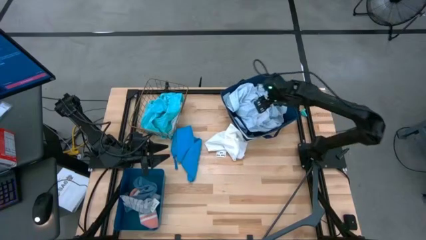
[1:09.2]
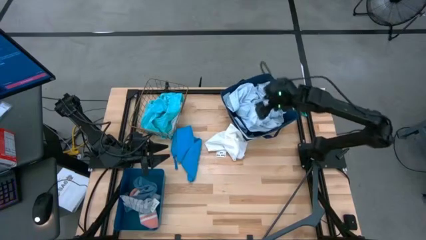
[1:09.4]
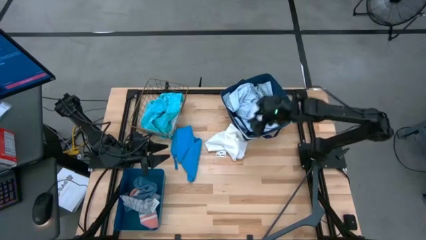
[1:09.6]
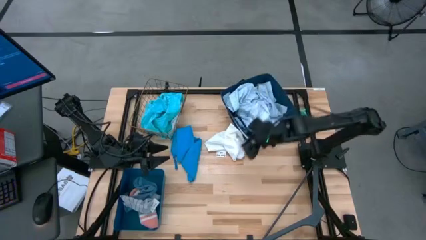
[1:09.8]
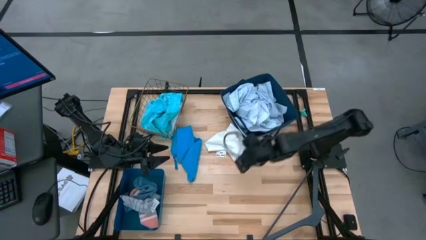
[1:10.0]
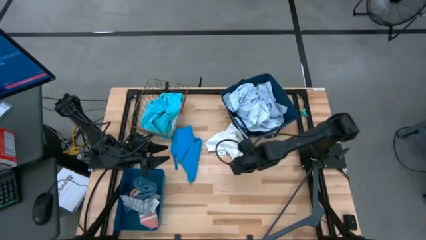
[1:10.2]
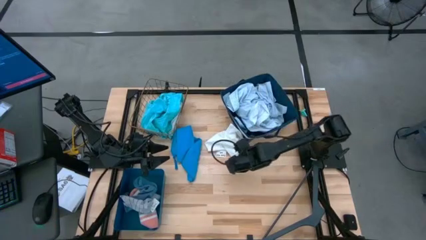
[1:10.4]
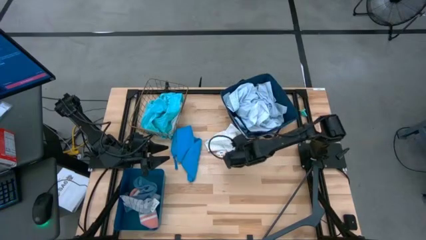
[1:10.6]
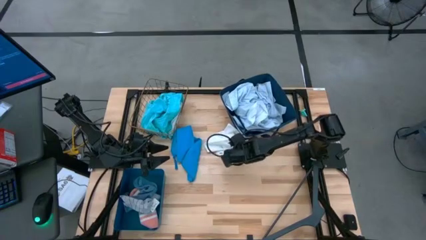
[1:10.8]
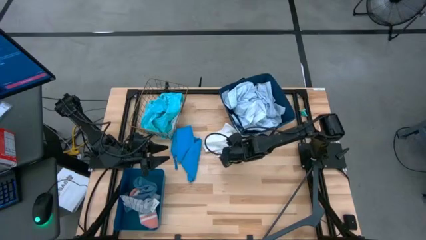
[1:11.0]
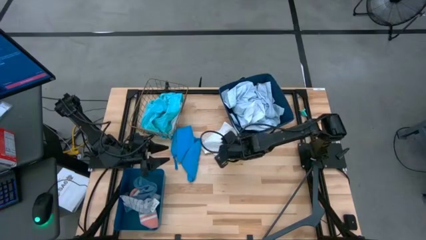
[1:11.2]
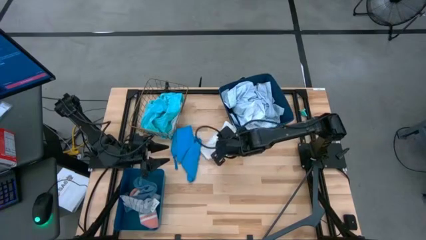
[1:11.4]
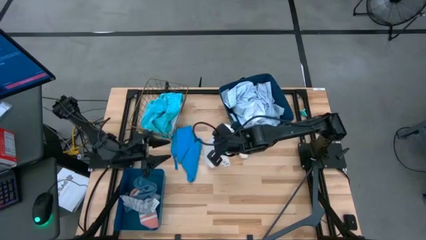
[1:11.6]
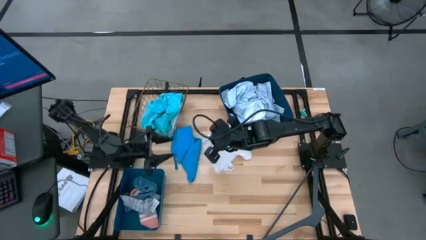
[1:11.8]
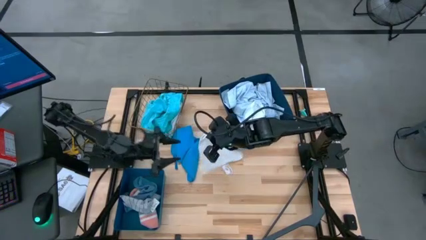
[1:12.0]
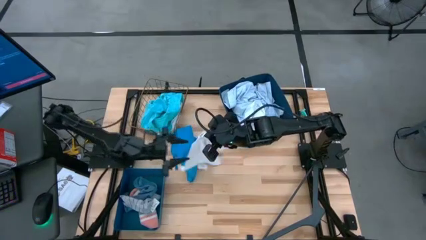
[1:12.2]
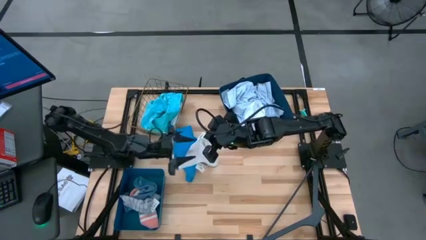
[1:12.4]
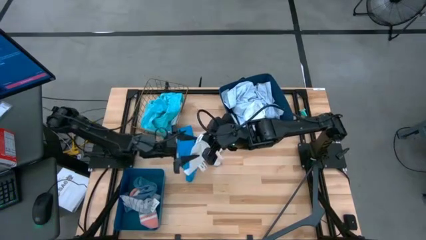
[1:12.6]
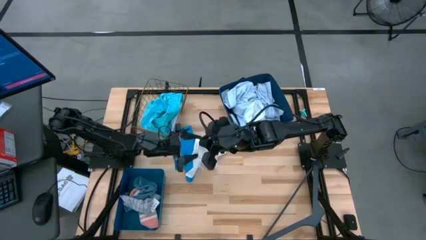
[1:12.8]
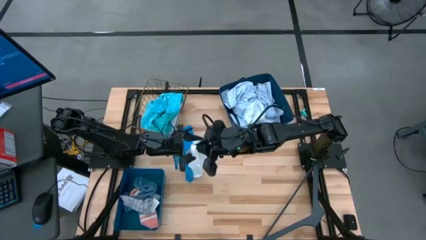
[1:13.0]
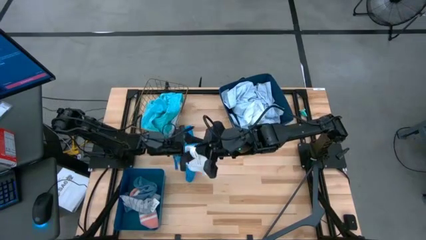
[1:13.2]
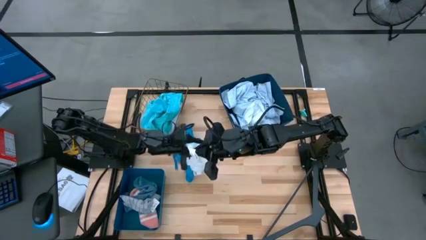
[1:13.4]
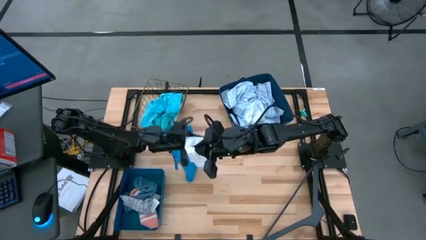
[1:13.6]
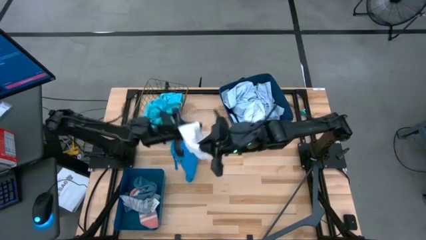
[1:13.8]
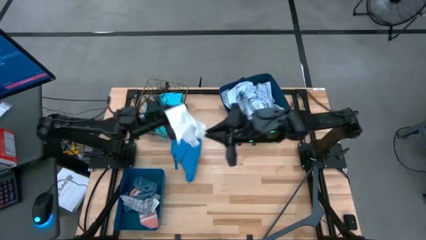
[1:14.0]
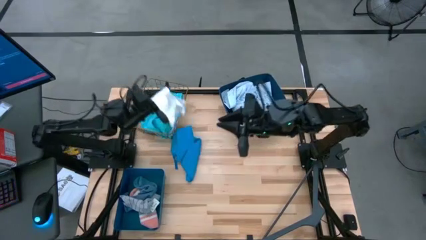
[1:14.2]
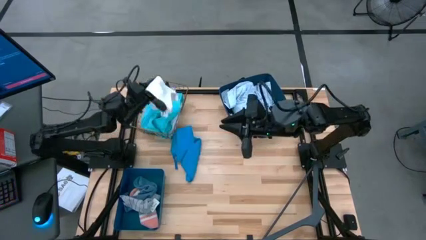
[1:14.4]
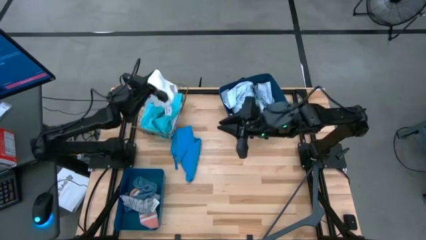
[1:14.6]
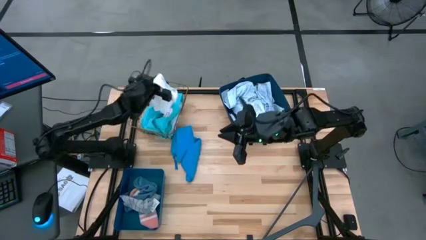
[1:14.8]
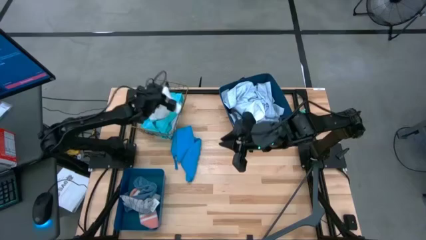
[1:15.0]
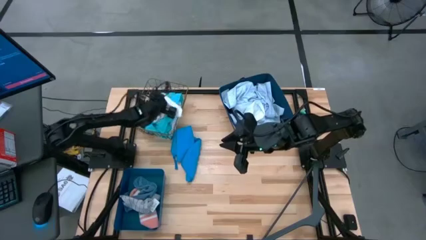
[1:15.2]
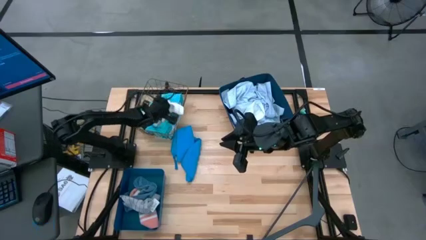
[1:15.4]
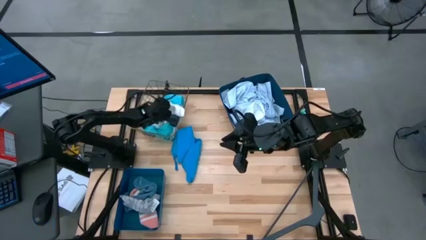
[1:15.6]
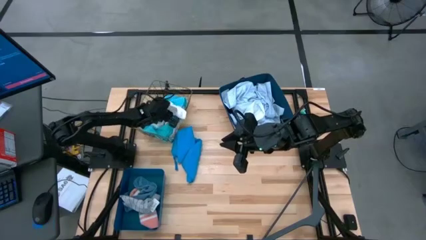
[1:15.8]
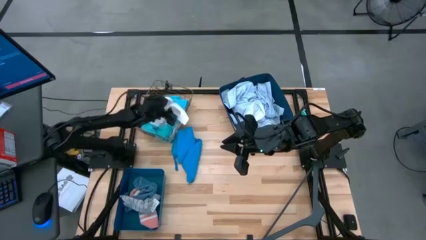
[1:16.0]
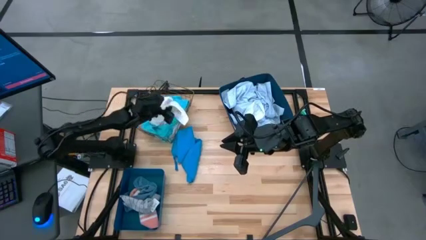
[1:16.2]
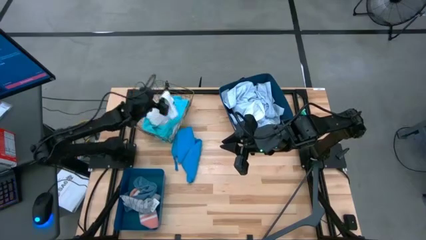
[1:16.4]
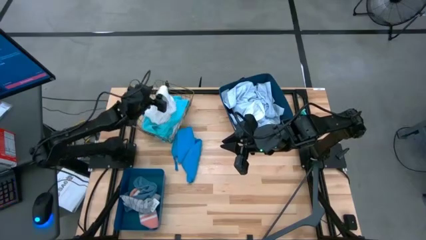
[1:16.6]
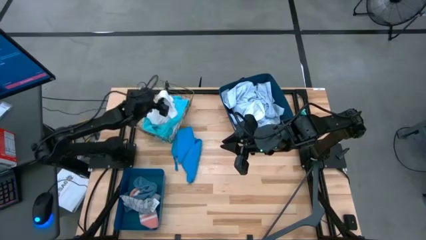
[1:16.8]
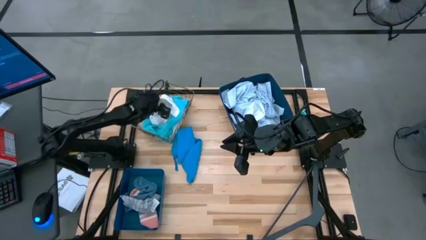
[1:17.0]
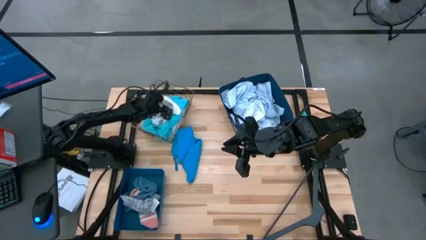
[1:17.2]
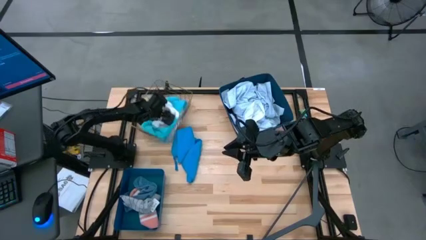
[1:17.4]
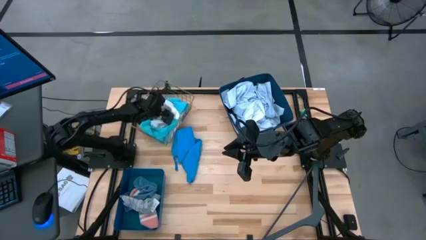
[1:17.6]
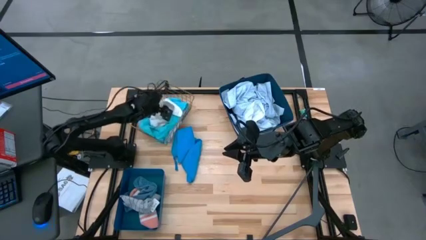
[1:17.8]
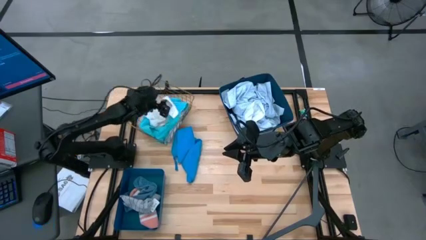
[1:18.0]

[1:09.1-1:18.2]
Task: Pick & Place Cloths
Put the white shorts into the brown wire basket

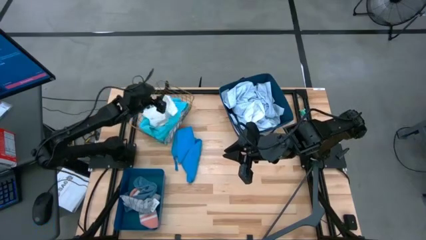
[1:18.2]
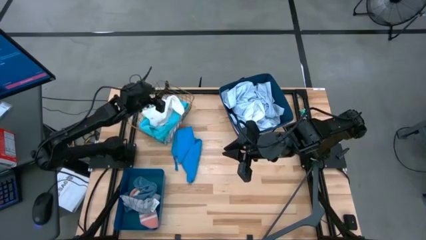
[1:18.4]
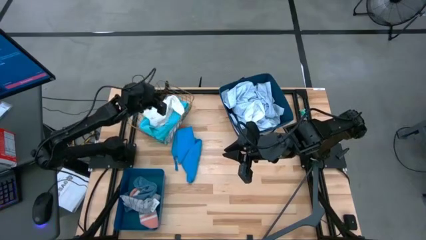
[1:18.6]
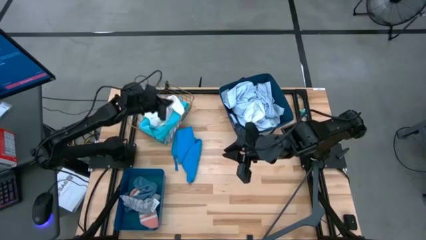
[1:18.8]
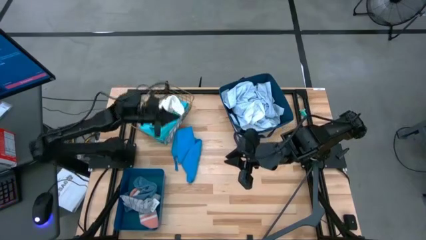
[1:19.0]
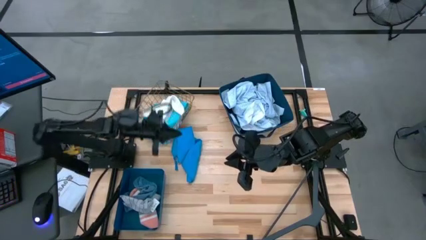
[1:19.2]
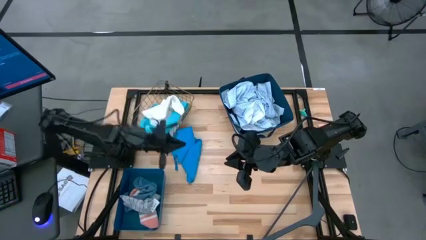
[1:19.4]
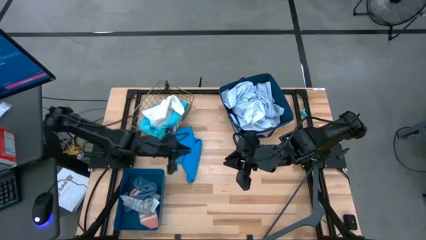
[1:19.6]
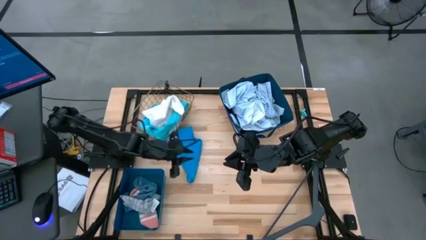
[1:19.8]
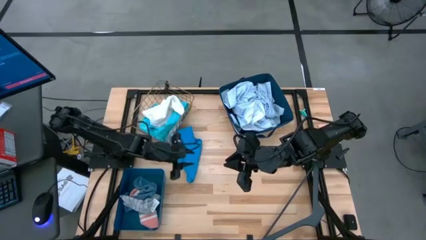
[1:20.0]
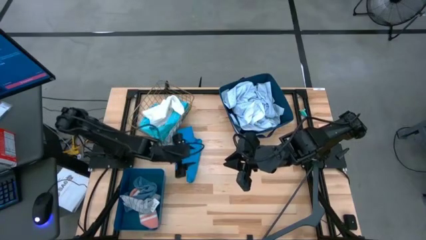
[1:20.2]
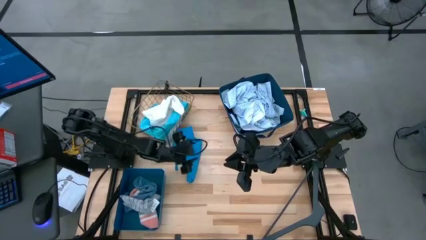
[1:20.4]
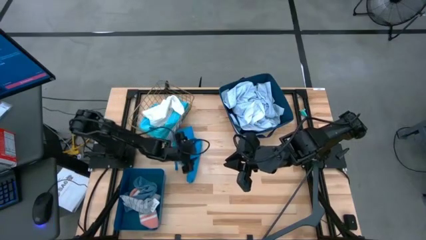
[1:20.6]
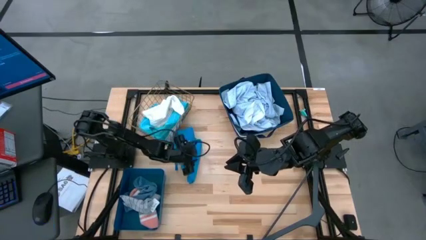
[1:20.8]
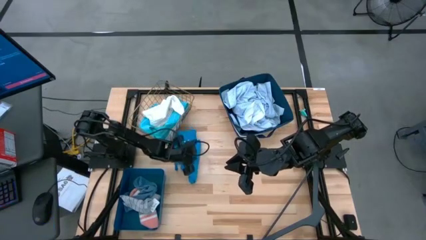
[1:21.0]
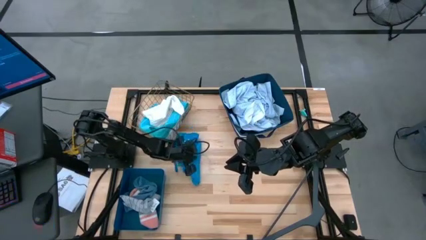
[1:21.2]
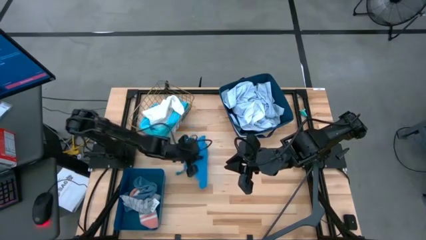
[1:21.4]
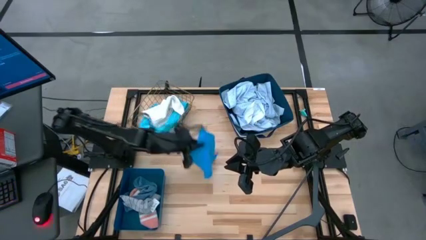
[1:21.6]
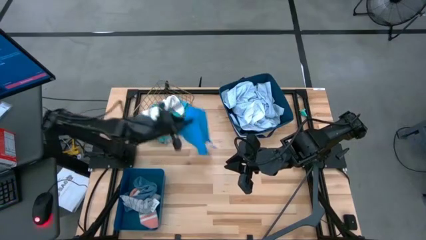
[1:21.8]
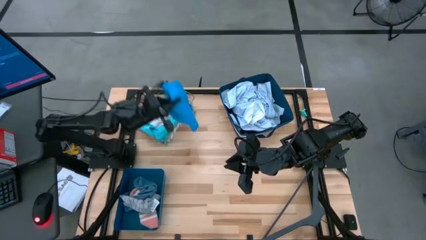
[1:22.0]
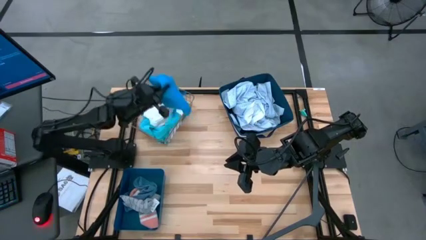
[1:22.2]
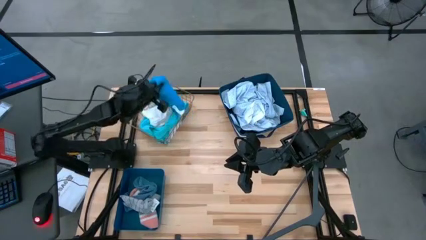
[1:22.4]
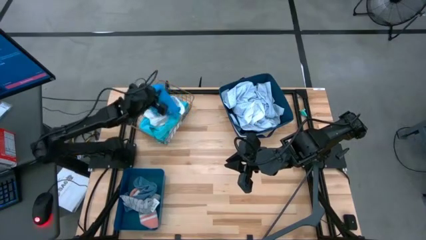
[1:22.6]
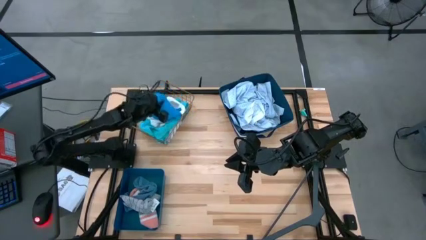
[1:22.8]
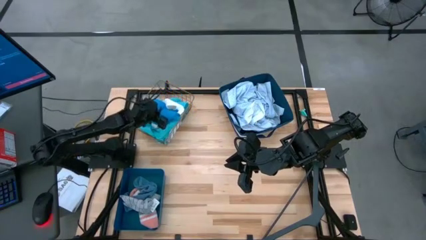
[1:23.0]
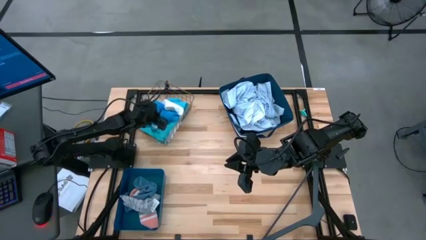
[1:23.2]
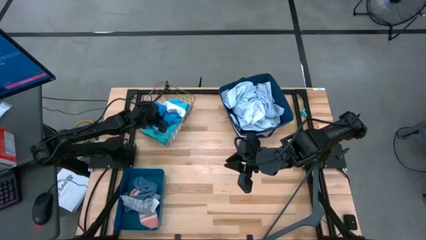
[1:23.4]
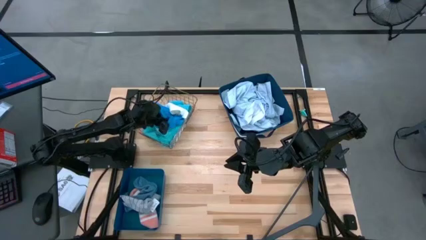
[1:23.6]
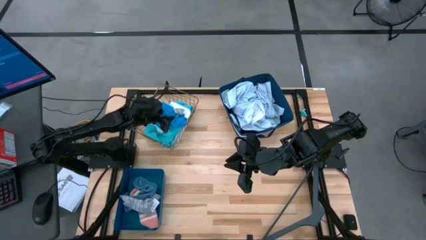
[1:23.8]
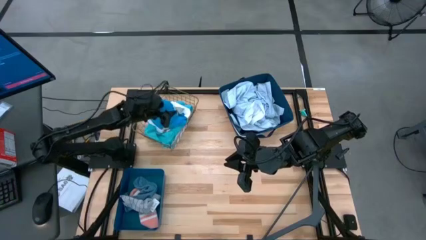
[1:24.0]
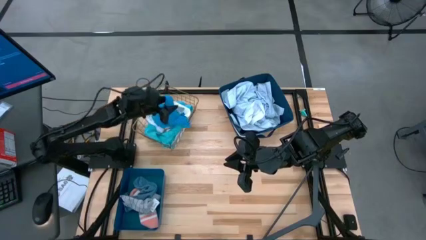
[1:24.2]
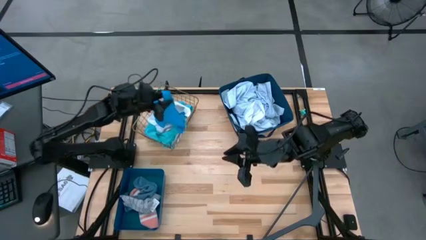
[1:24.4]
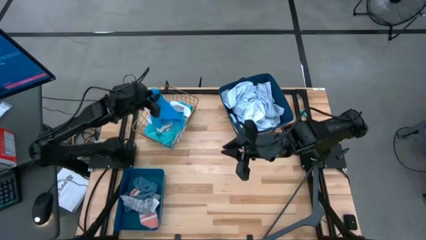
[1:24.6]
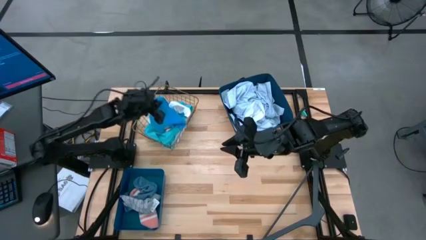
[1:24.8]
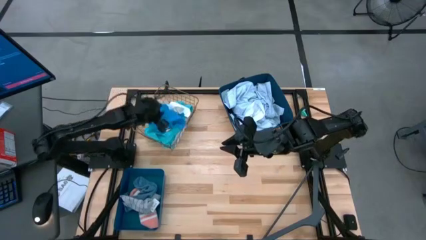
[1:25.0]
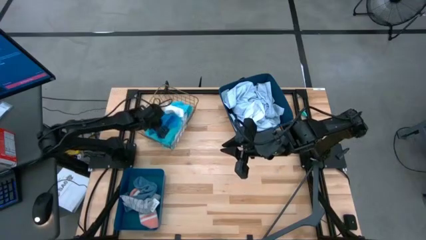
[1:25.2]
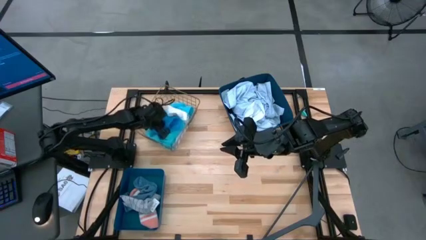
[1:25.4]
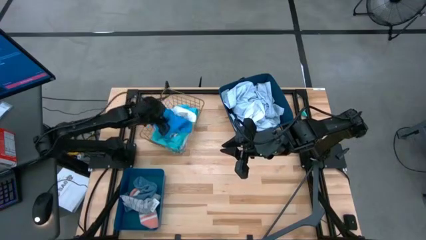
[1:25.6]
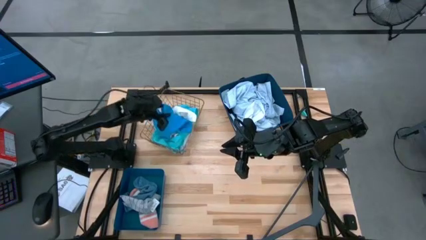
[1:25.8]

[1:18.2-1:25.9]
Put the blue shorts into the brown wire basket
